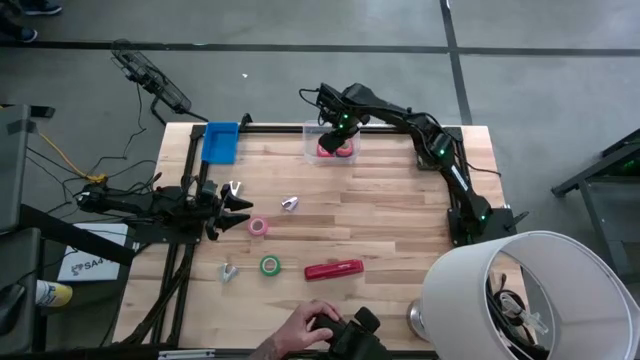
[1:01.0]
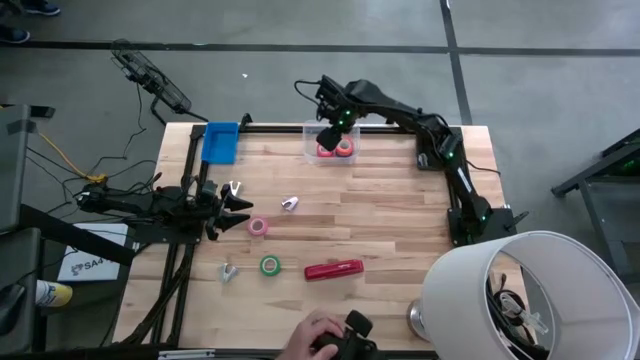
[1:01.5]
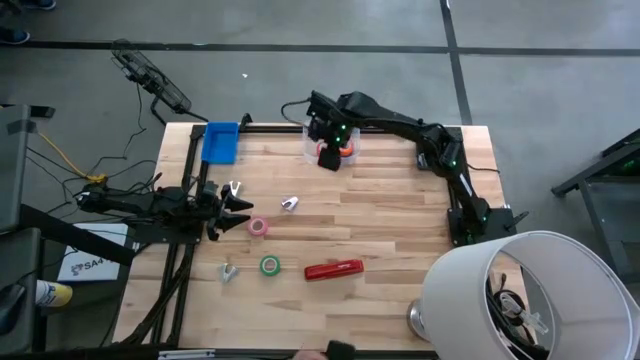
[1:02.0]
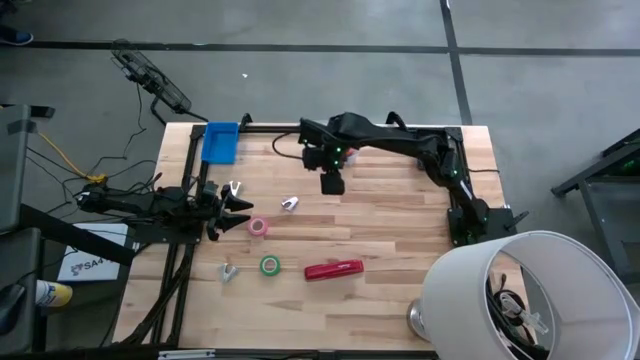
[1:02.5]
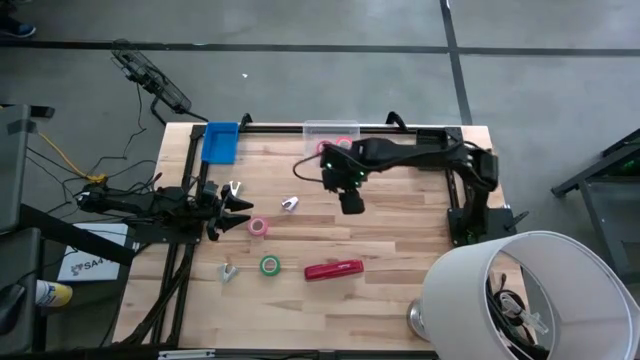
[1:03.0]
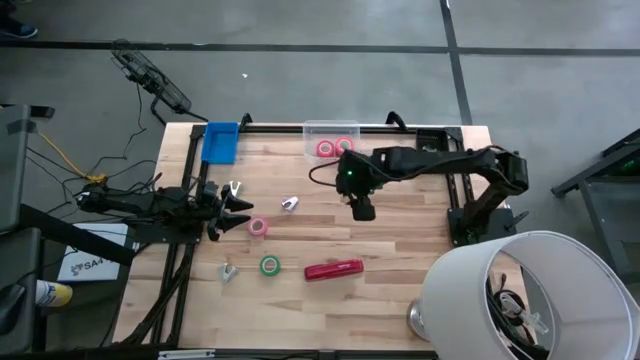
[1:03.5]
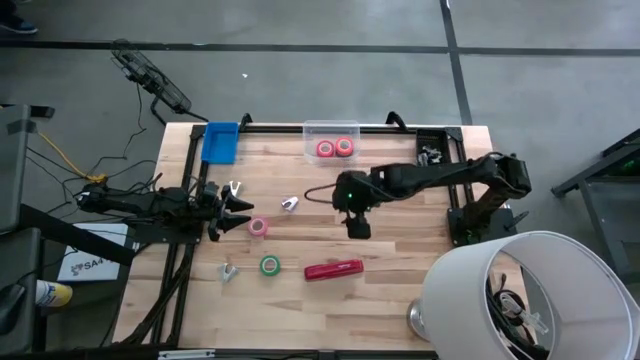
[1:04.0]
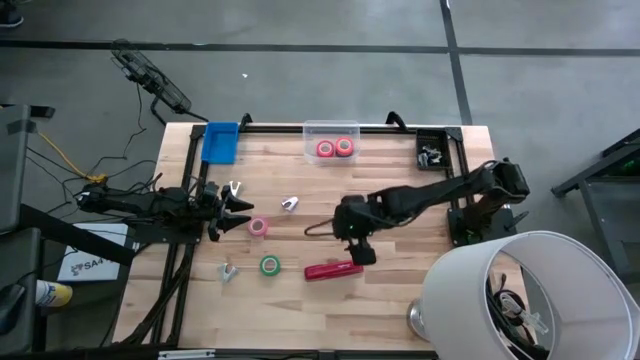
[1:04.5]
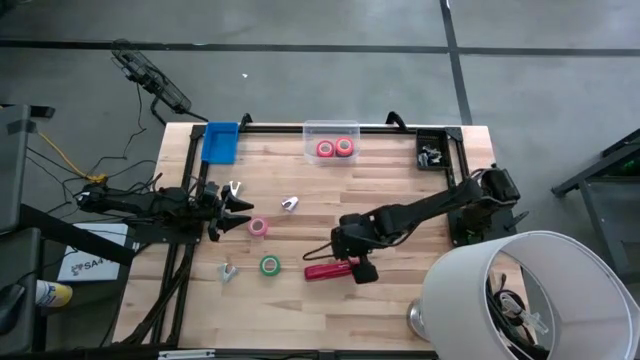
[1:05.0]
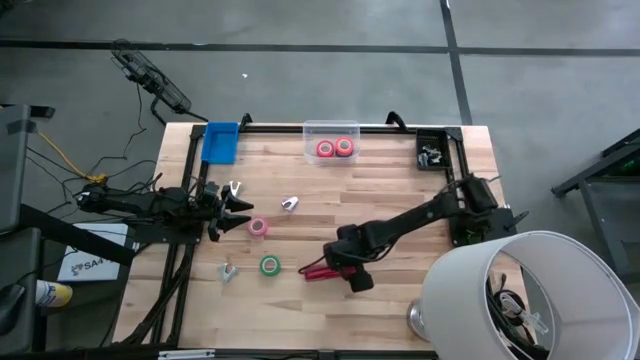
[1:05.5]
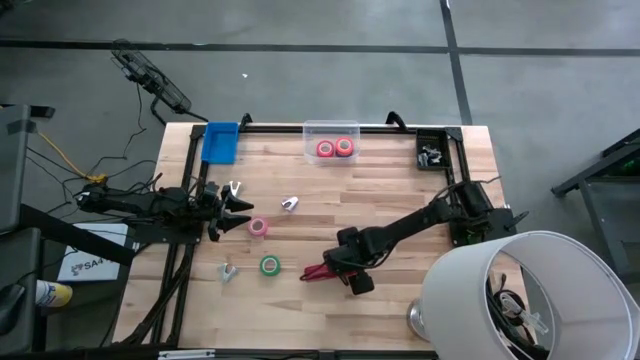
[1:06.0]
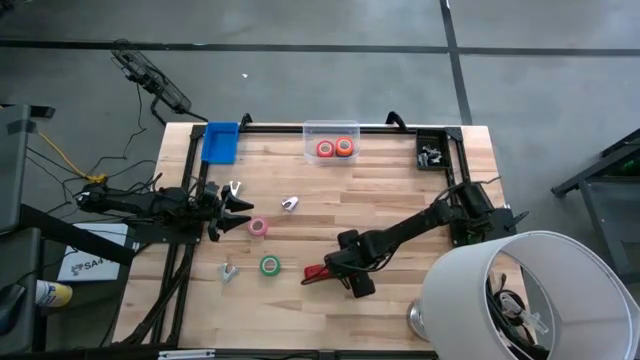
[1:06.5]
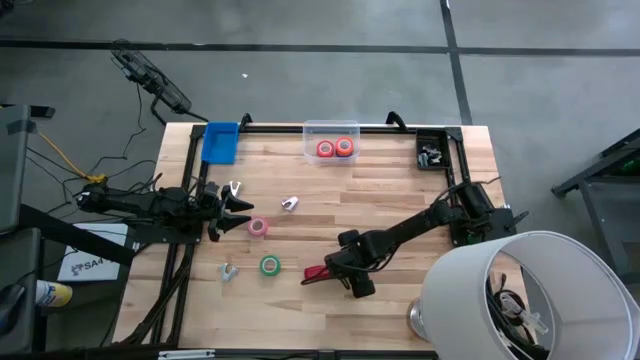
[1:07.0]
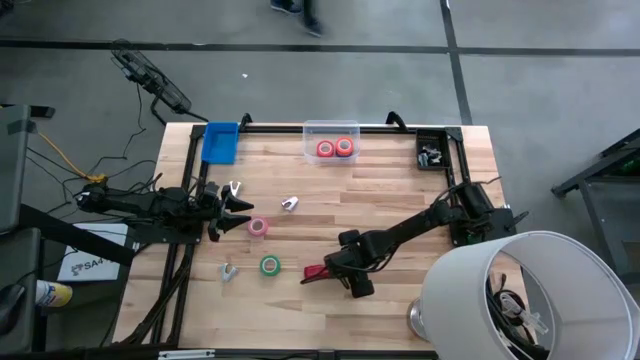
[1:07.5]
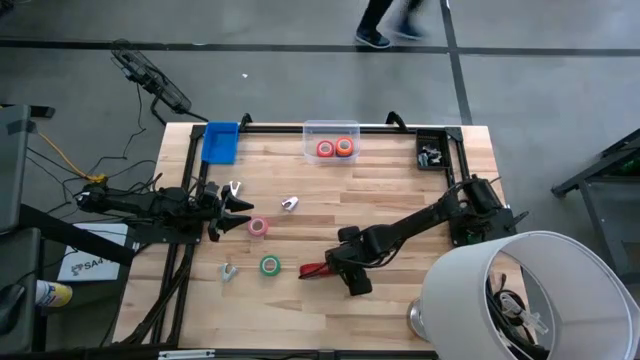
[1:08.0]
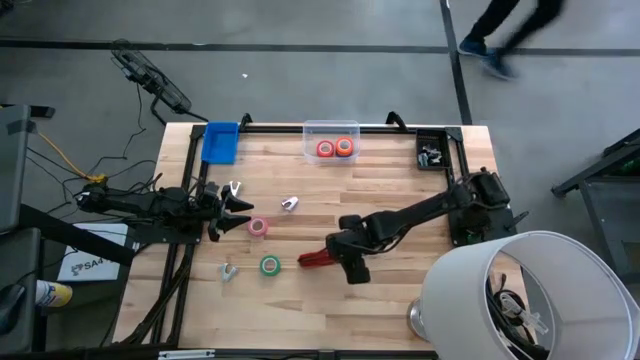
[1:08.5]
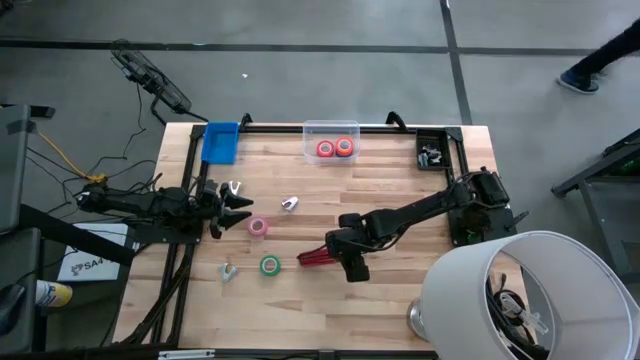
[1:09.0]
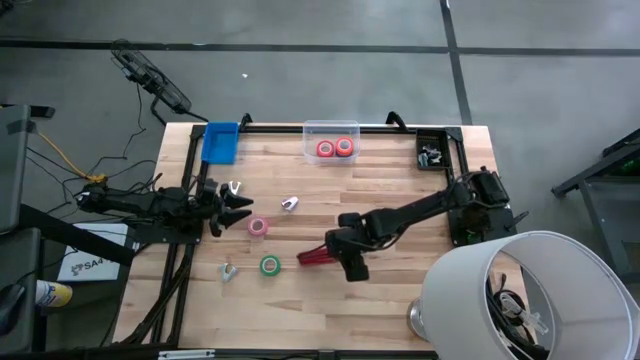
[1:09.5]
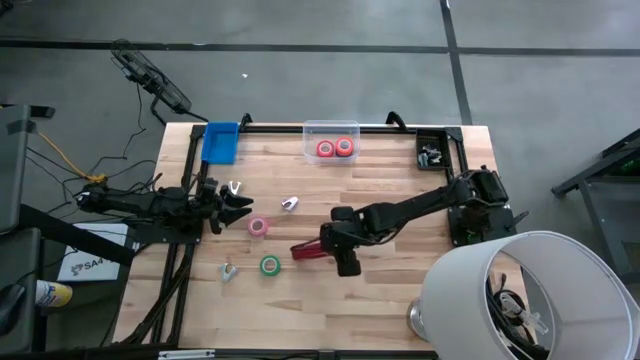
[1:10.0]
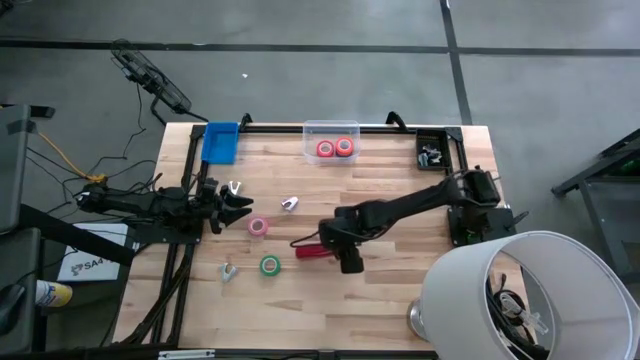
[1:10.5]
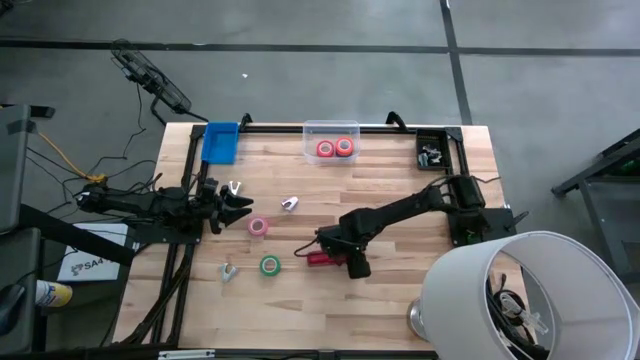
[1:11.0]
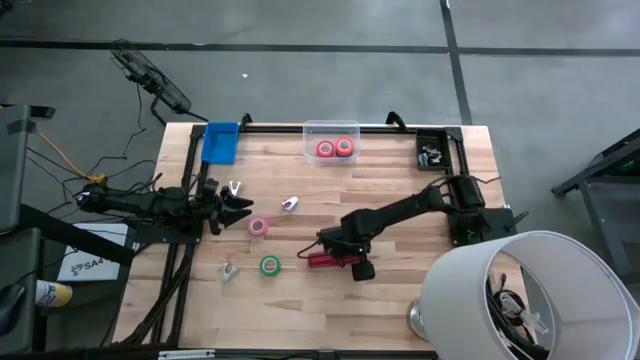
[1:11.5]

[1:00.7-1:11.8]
Task: Pick and place Stapler, Stapler remover, tape
Put the red stapler into the blue bin

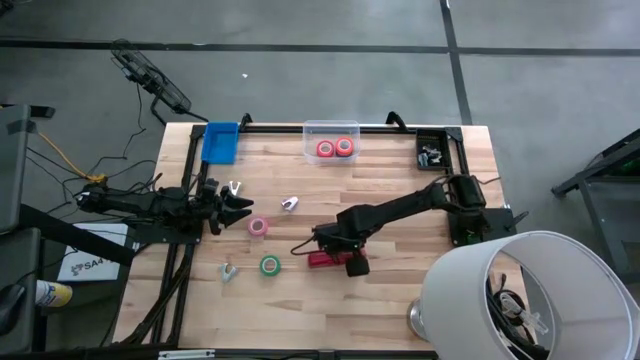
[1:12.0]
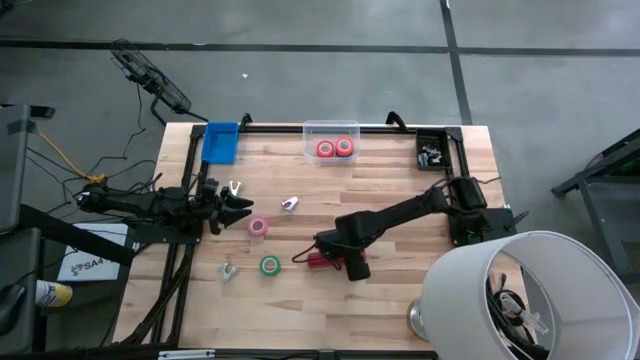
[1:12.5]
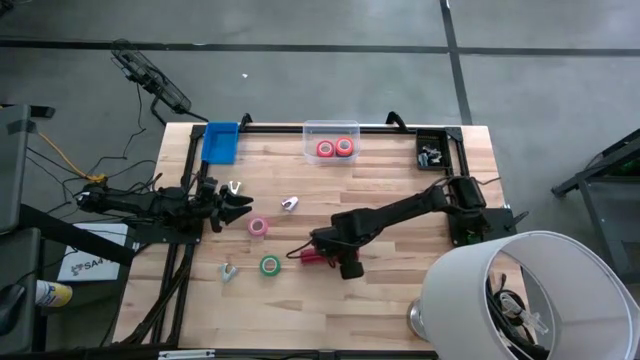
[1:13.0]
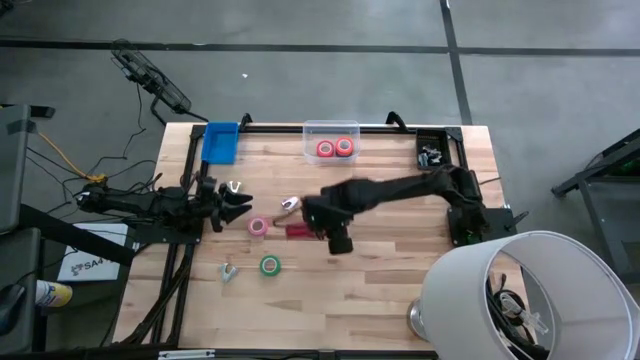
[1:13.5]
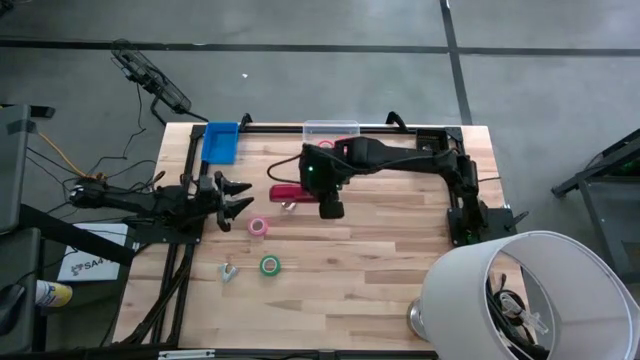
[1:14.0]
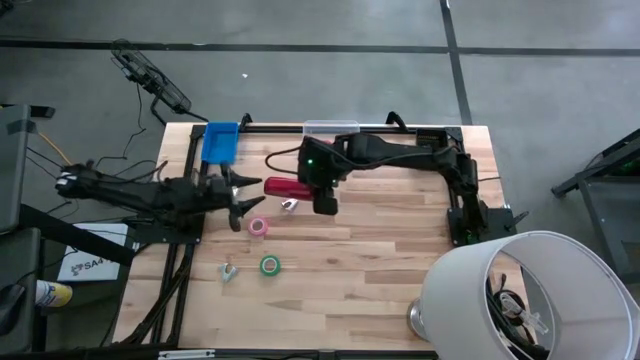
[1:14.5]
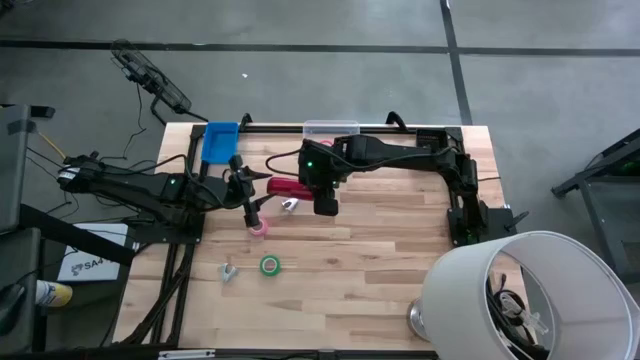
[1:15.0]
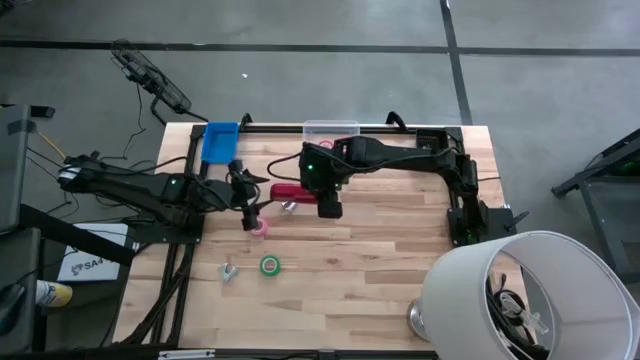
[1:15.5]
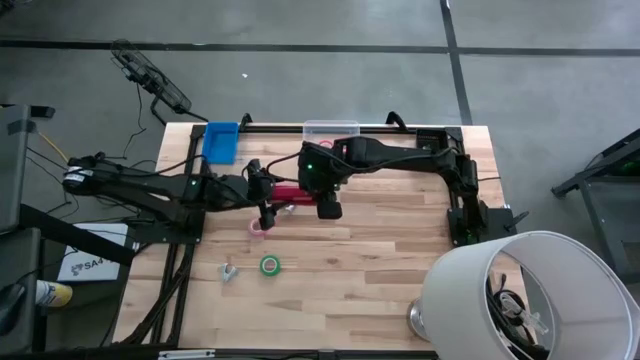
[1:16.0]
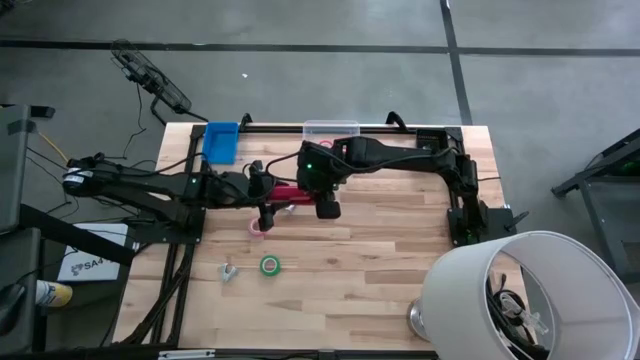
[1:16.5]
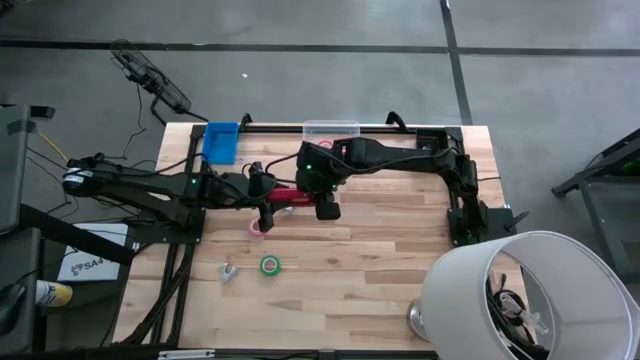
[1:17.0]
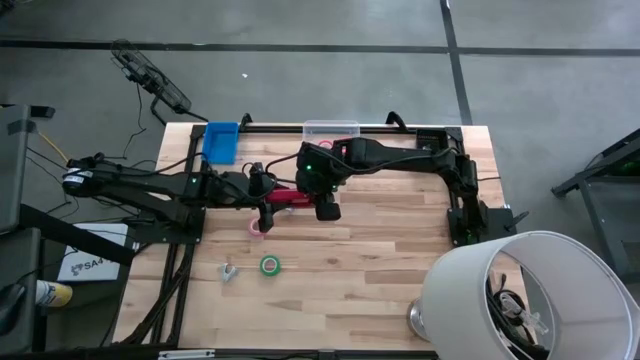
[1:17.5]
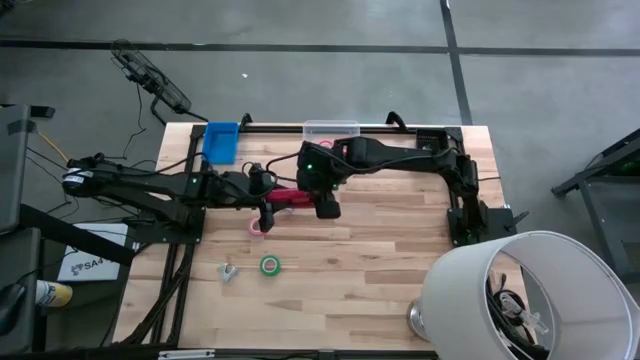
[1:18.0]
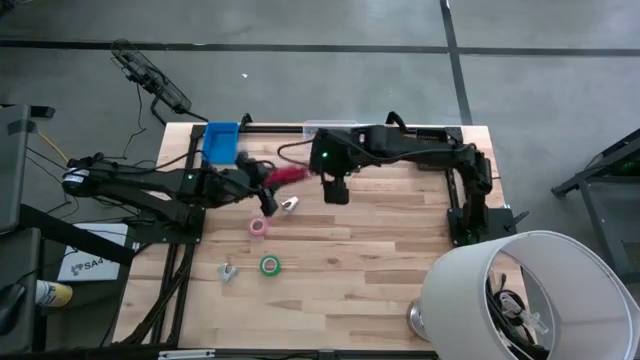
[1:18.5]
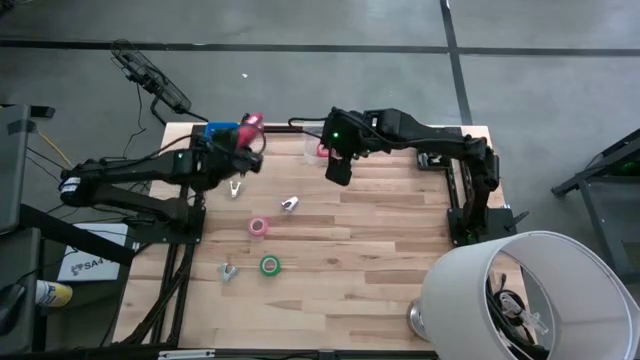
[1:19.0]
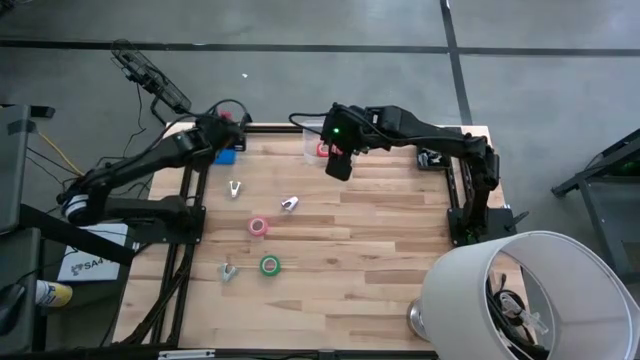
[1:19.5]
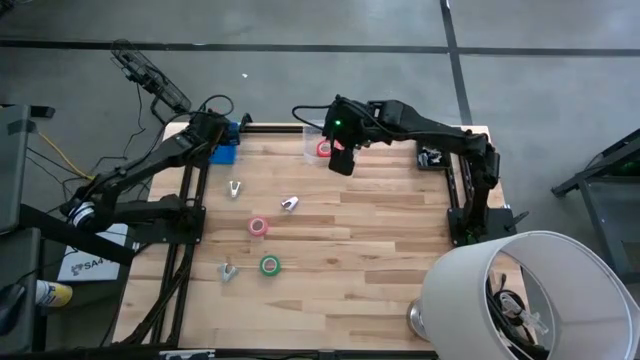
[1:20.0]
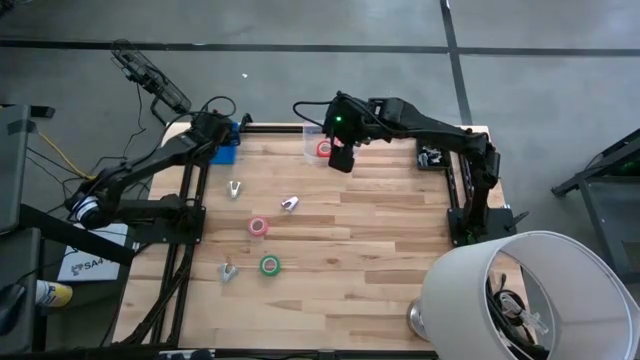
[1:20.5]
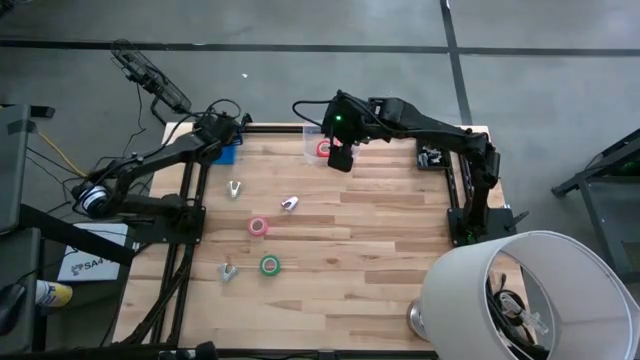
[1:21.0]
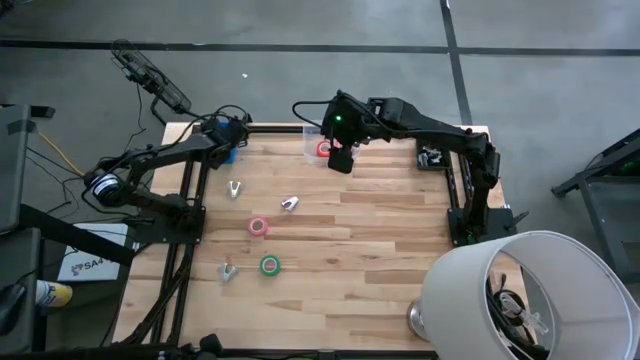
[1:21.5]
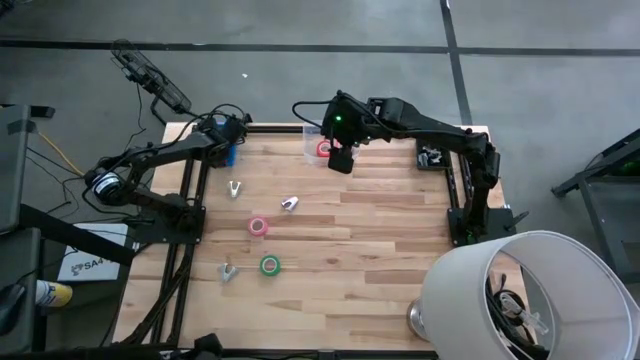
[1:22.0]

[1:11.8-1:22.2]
Put the red stapler into the blue bin

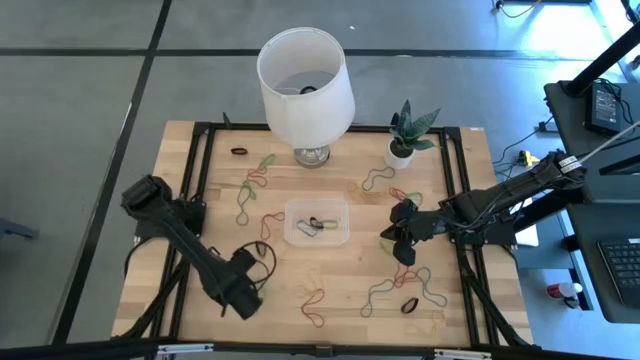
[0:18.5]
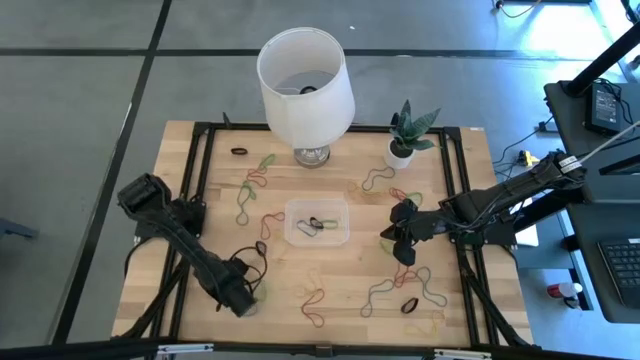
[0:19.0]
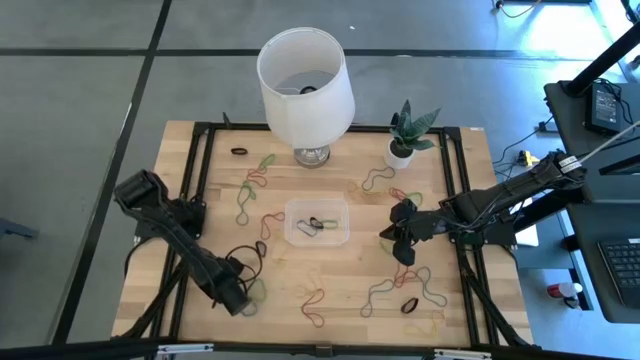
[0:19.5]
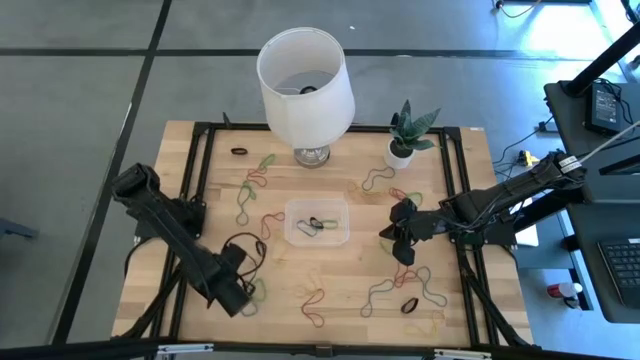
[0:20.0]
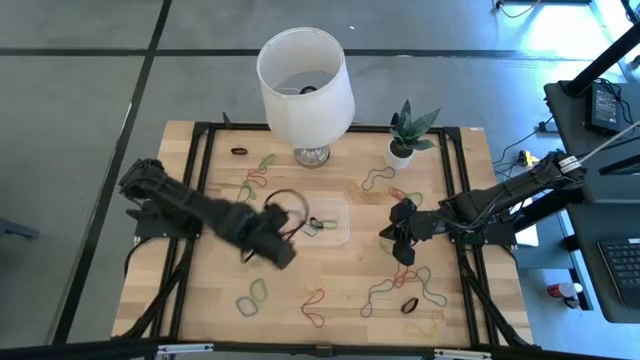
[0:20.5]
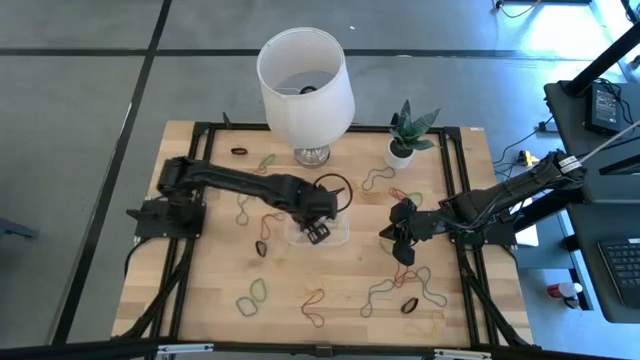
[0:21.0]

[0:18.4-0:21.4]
Task: Pick and place rubber bands into bin
Put the red rubber band into the transparent bin
